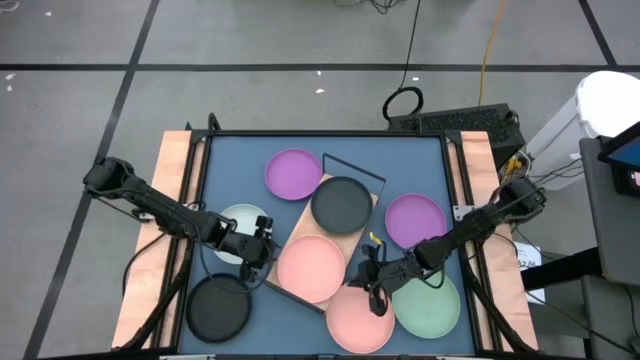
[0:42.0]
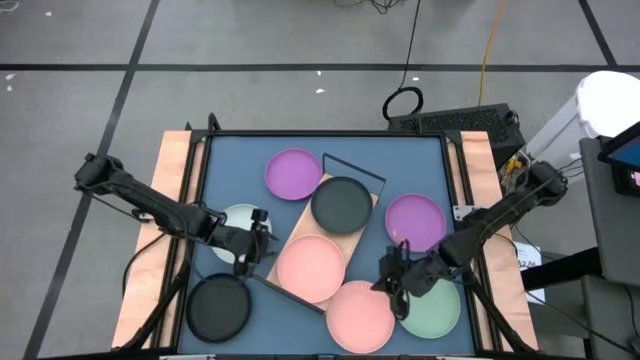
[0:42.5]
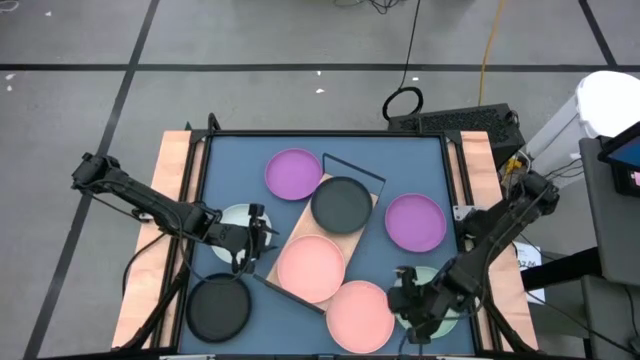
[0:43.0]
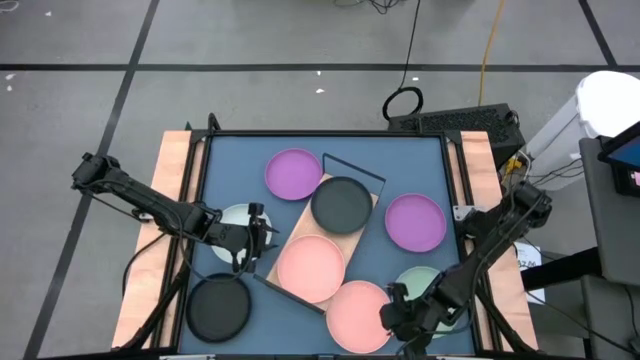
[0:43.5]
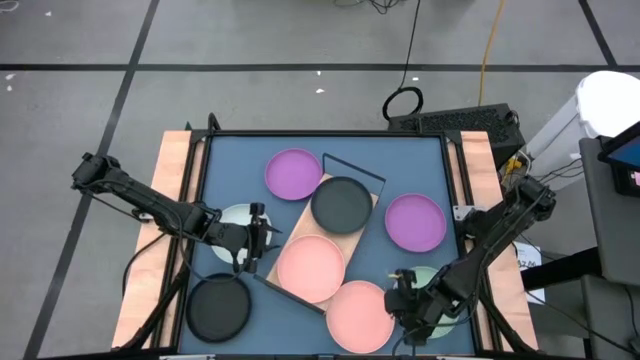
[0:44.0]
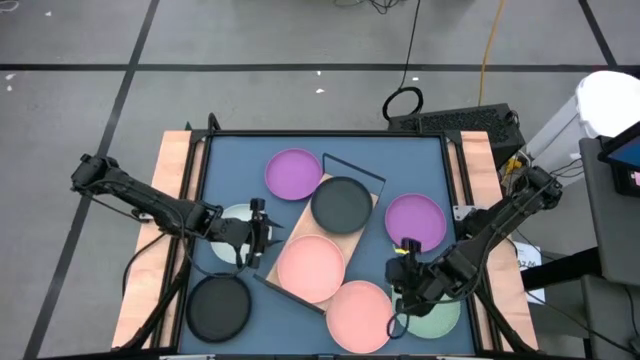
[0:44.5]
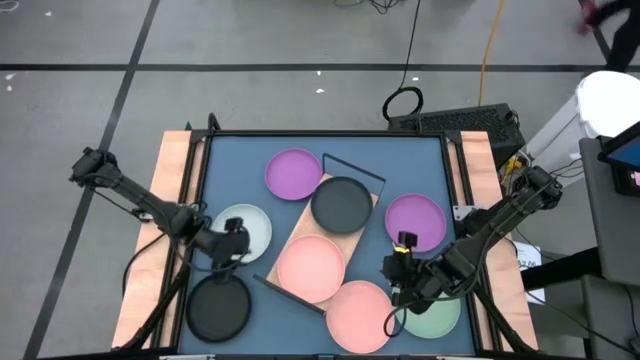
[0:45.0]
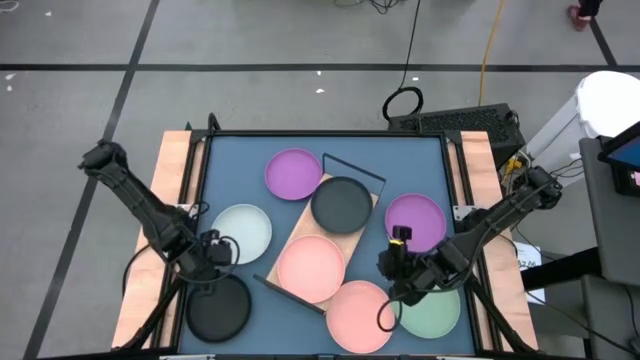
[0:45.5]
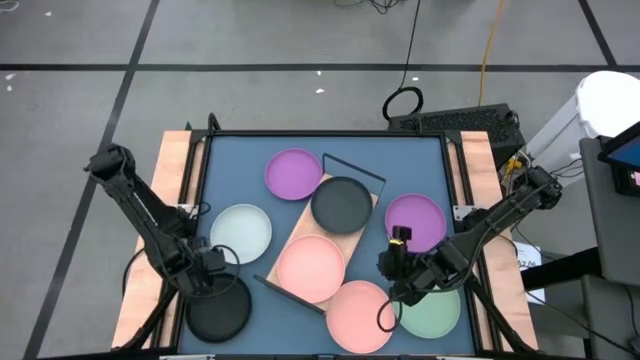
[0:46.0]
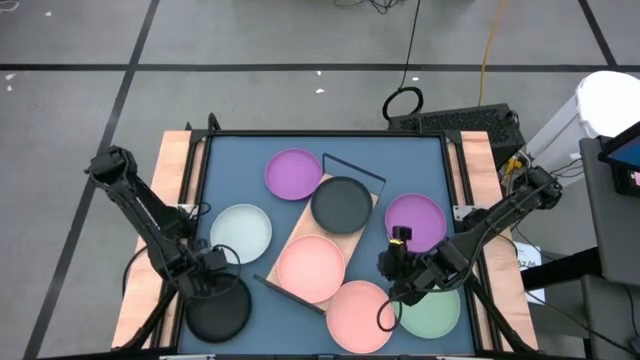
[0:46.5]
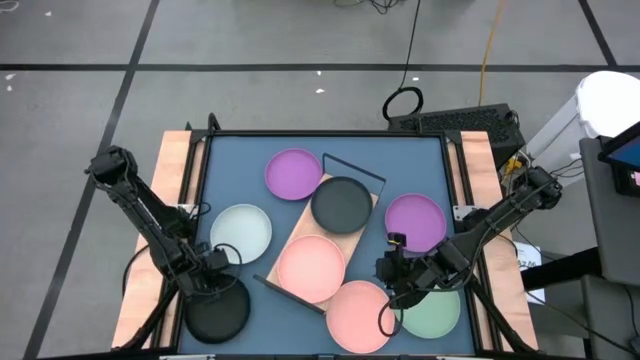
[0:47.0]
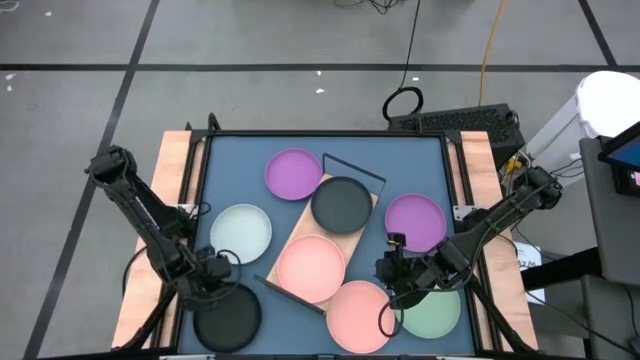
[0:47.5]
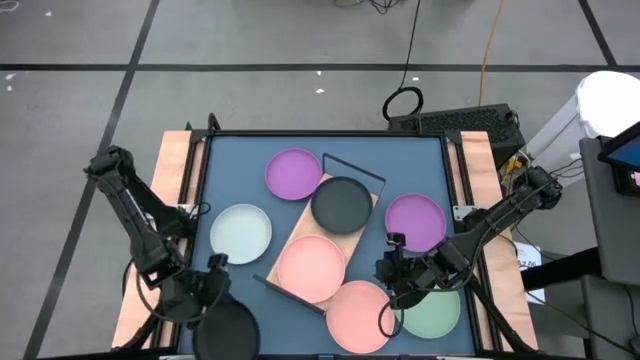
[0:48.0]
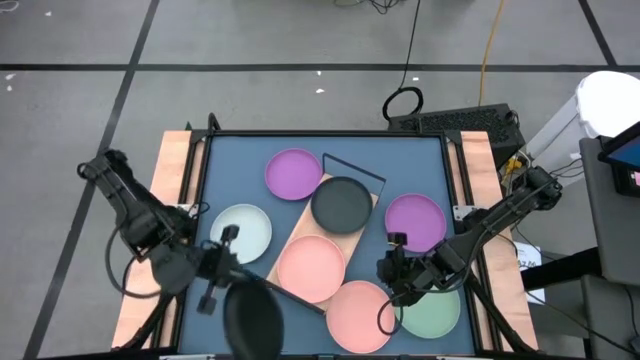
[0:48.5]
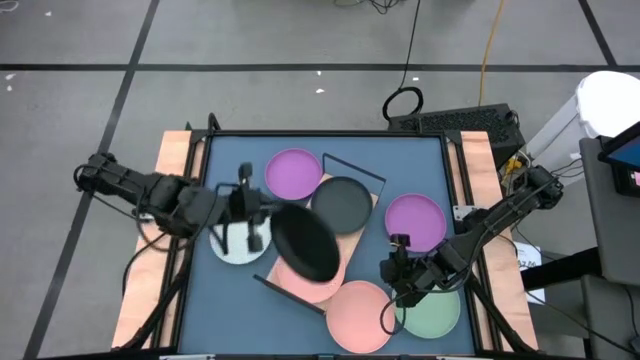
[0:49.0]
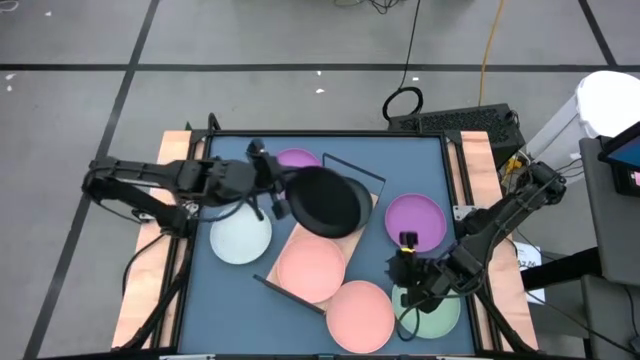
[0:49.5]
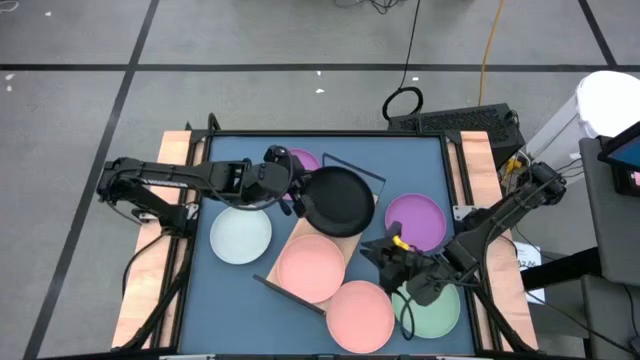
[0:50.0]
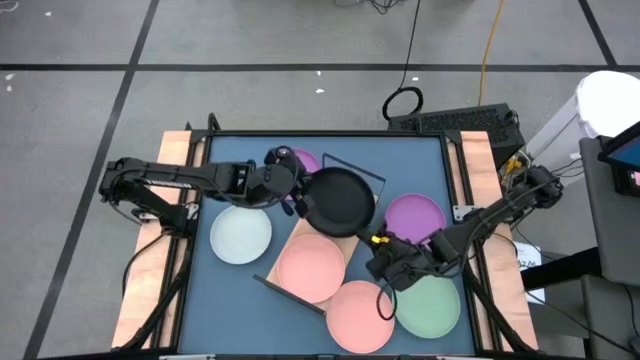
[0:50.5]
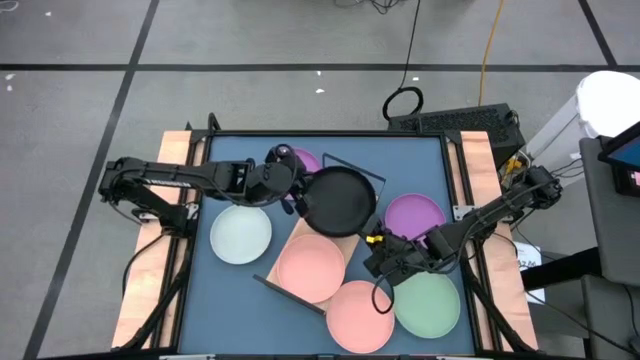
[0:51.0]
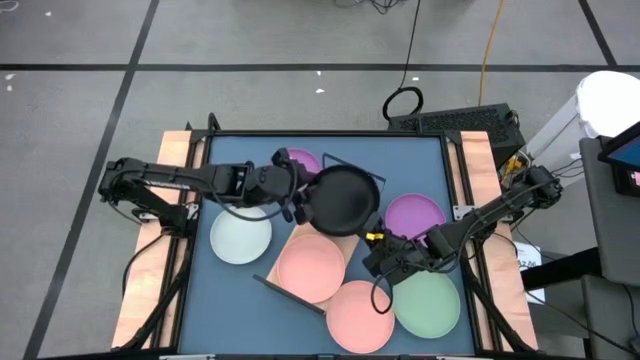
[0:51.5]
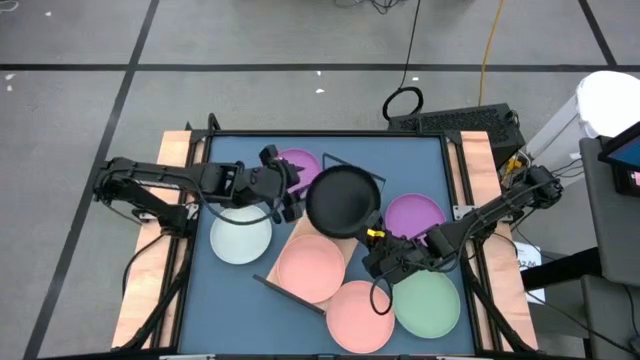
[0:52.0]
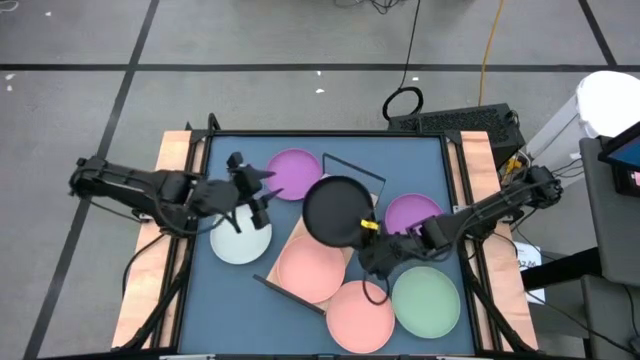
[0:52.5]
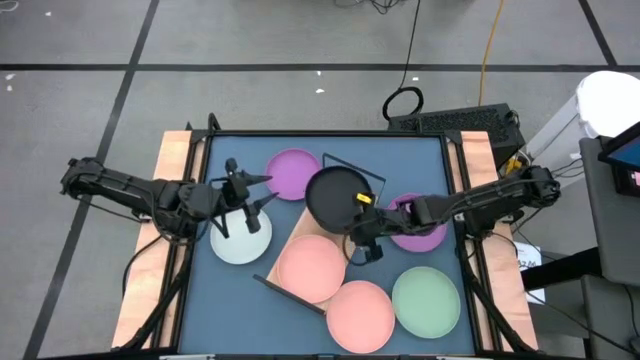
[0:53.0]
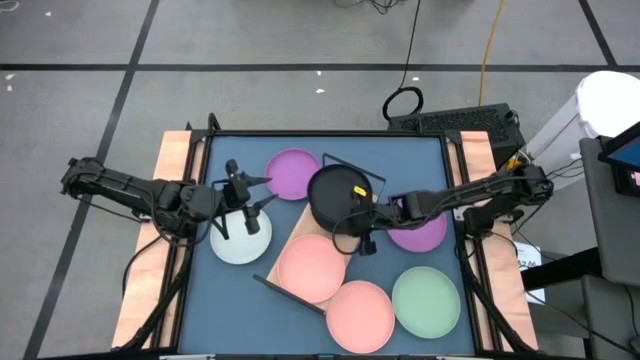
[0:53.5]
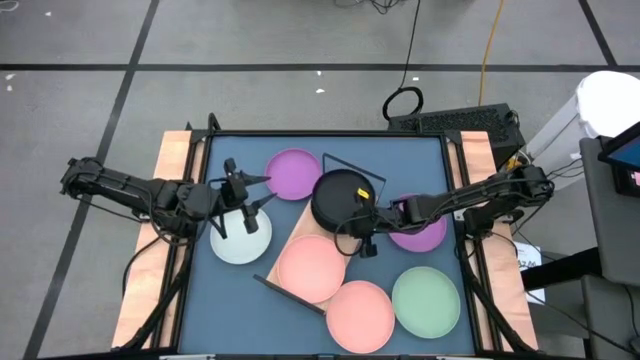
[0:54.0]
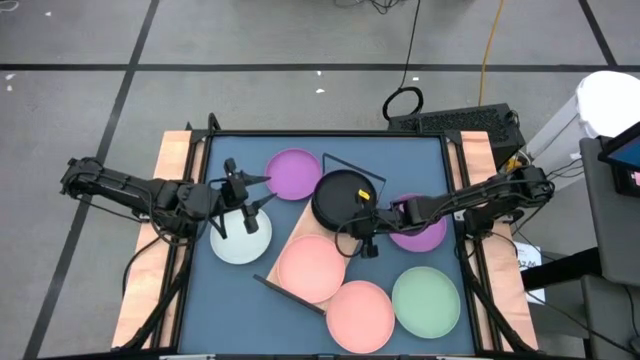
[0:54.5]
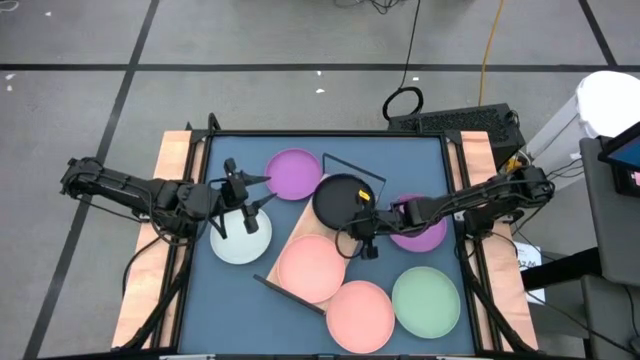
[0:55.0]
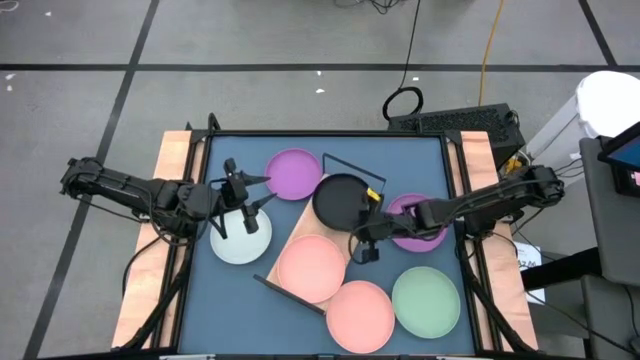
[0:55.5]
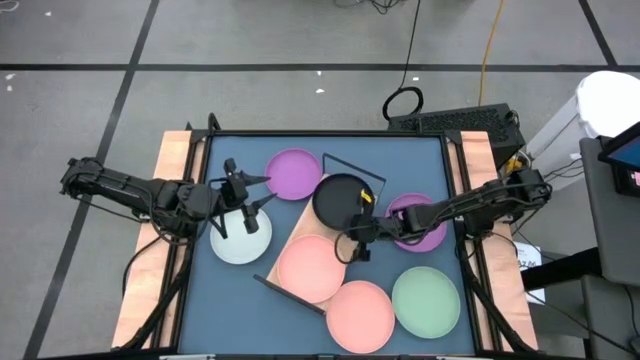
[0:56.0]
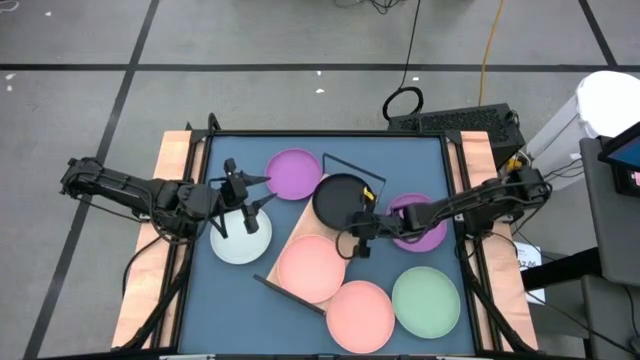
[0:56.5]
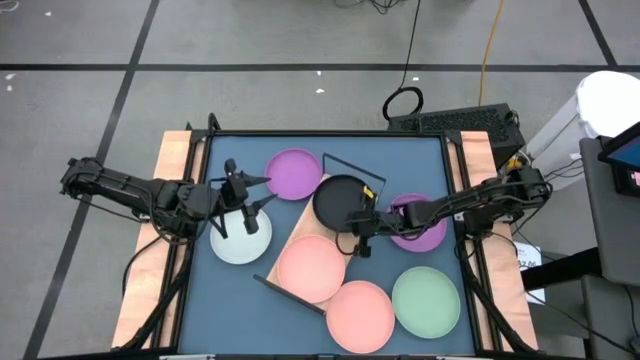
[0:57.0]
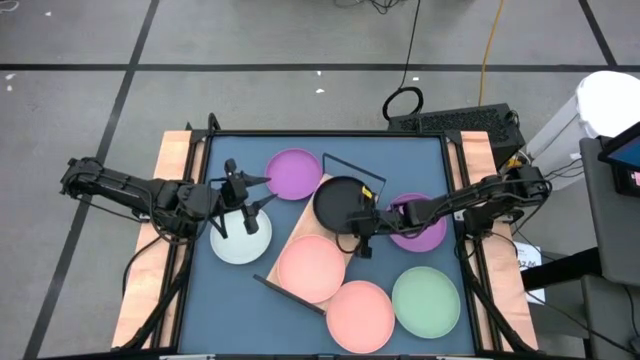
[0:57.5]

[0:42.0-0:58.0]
Task: Place and stack plates onto a shelf
Stack the black plate on top of the black plate on the shelf

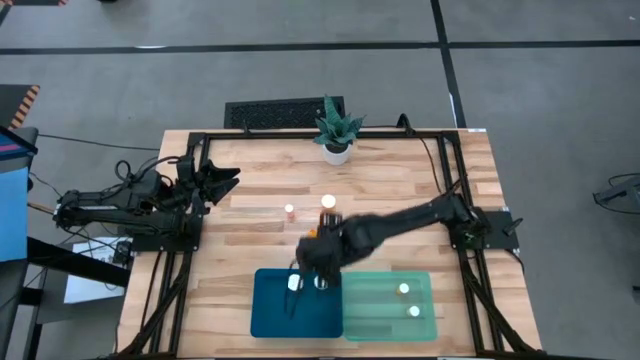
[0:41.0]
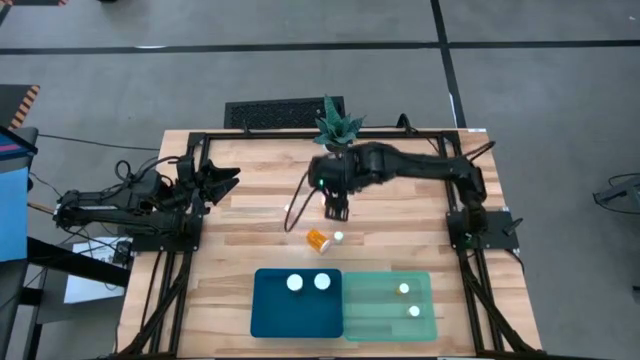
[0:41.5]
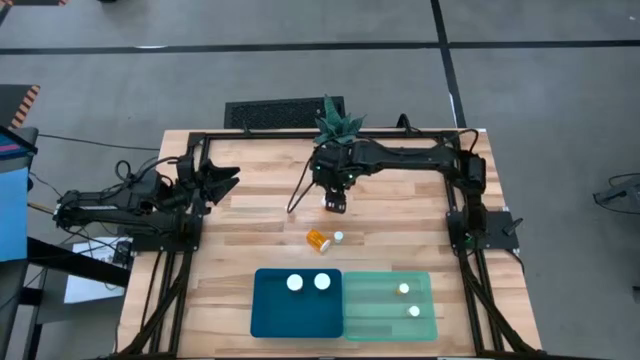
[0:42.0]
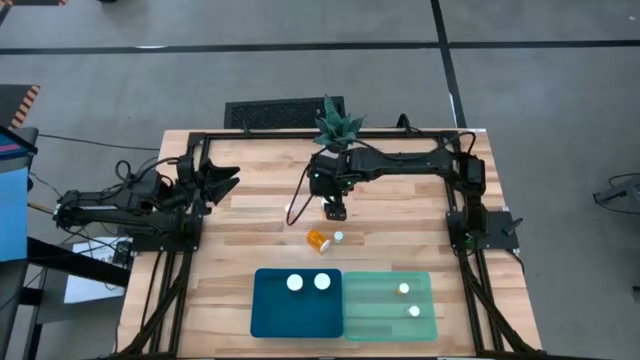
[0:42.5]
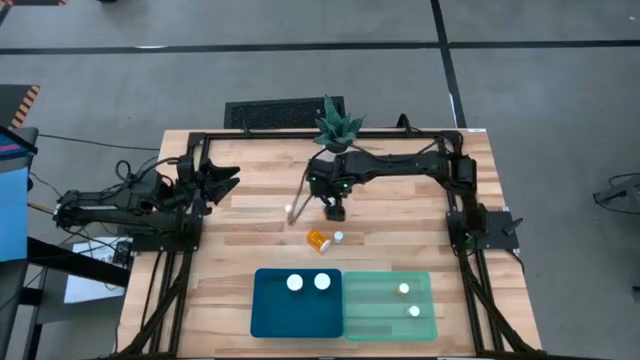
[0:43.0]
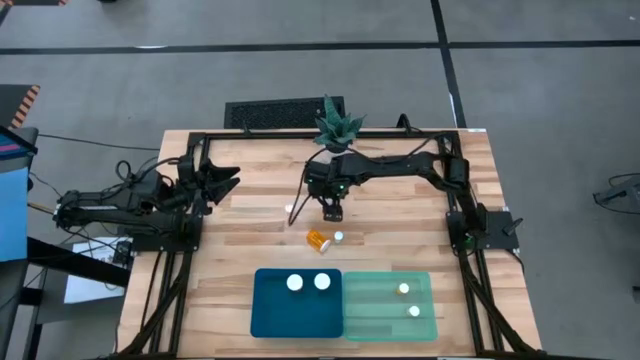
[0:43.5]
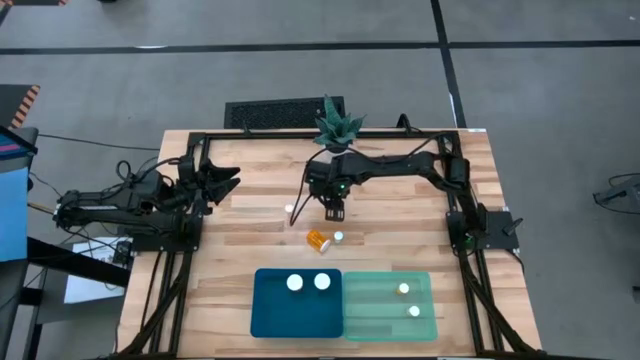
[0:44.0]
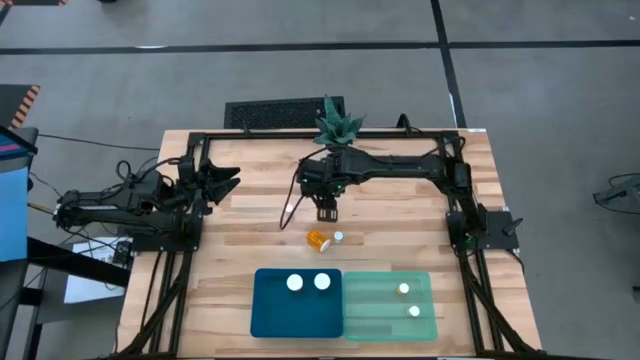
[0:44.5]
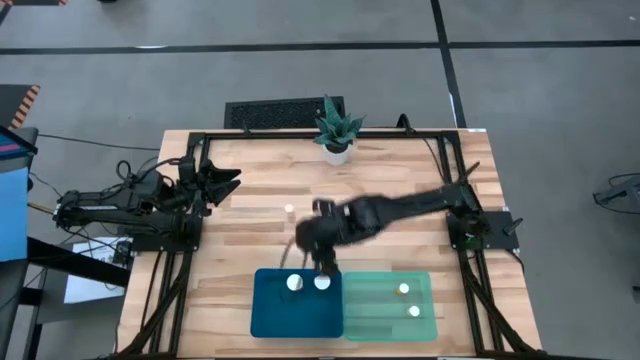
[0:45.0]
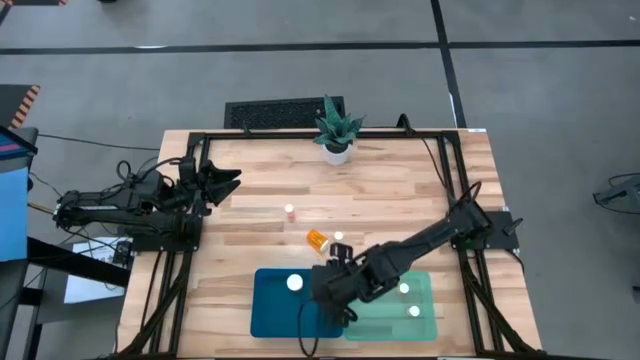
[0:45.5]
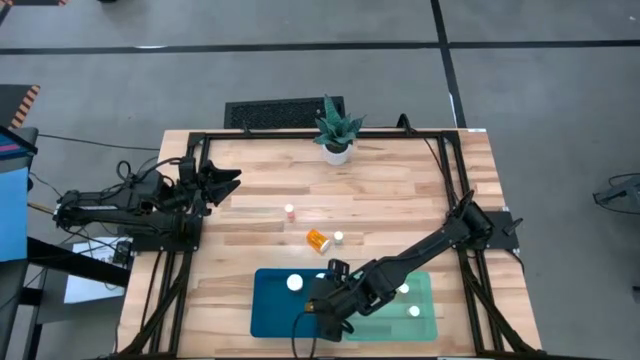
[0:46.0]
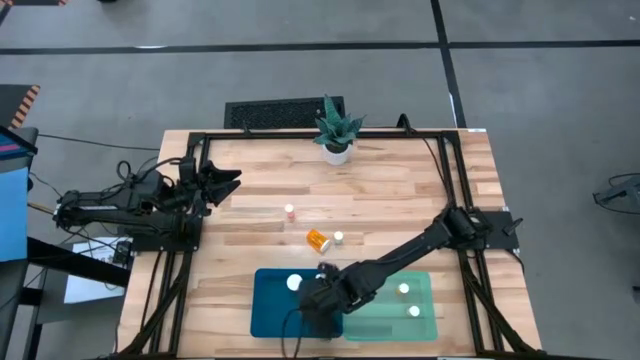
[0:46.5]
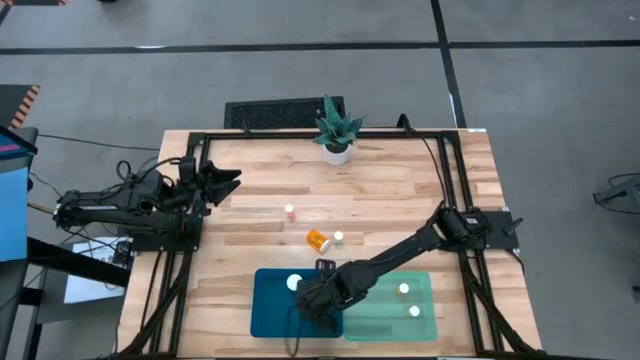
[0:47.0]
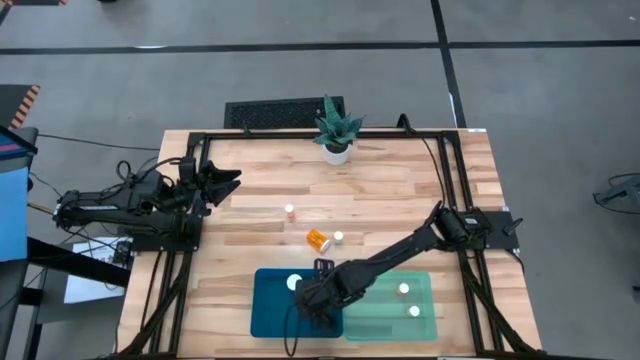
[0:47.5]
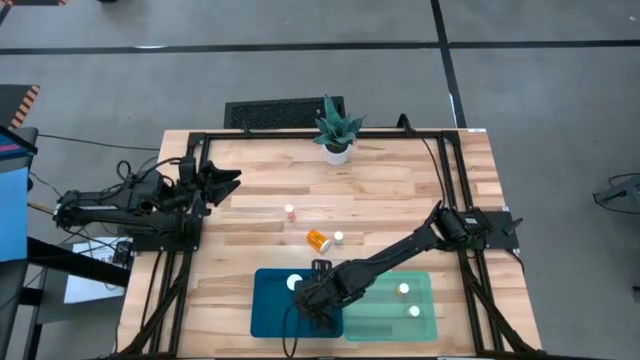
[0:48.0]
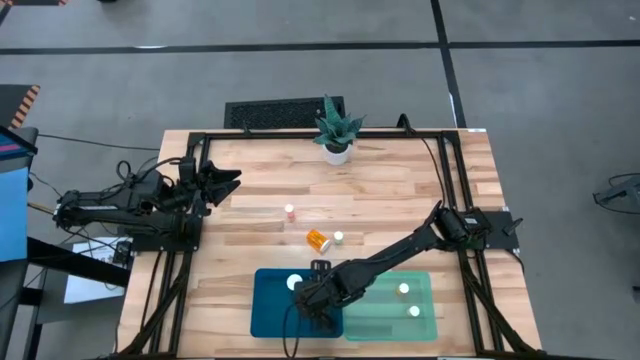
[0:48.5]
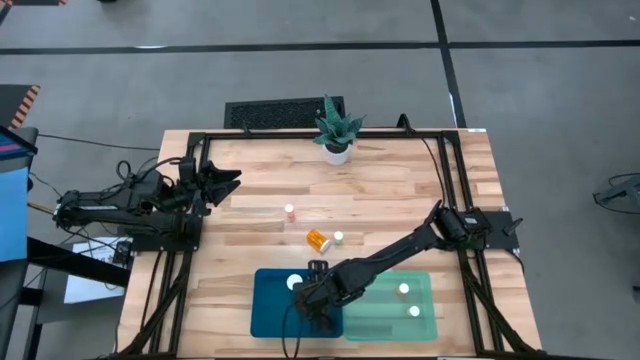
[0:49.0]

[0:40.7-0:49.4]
Task: Pick and place medicine bottles into bin by pill shape (circle, oval)
Put the large orange pill bottle into the blue bin
